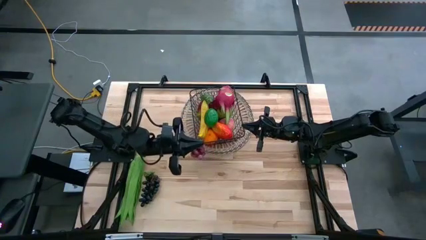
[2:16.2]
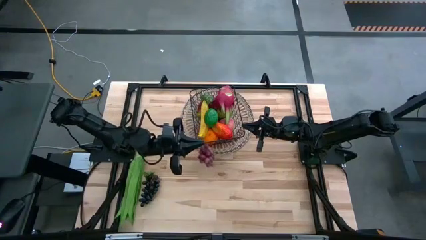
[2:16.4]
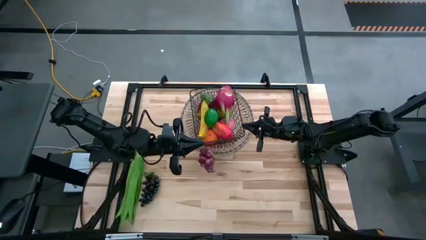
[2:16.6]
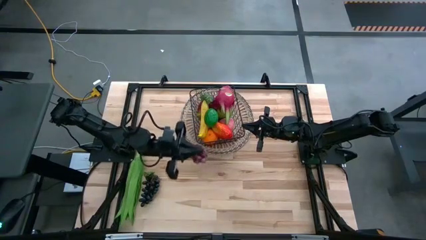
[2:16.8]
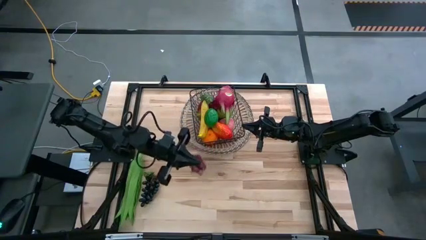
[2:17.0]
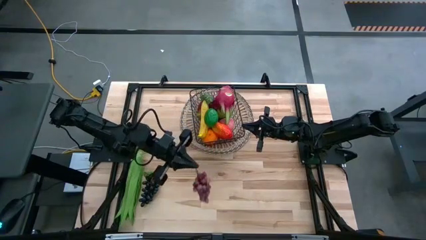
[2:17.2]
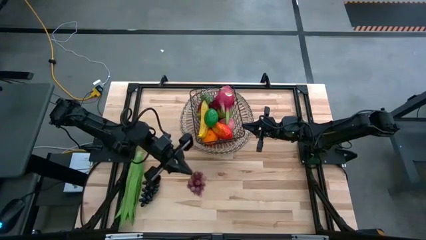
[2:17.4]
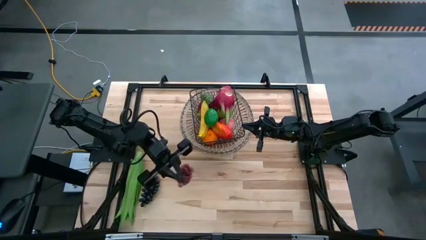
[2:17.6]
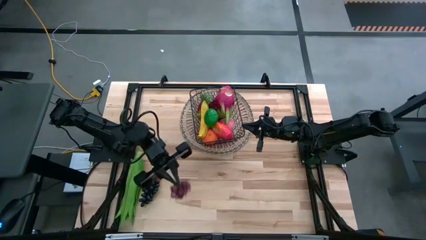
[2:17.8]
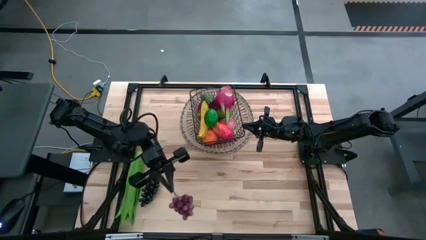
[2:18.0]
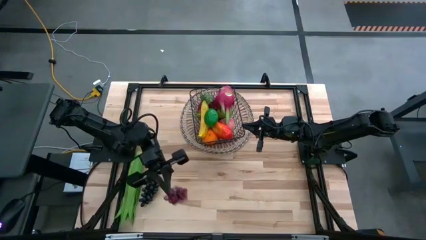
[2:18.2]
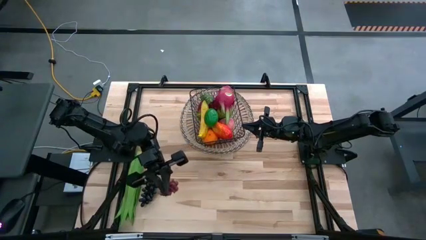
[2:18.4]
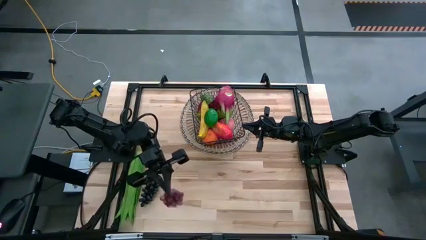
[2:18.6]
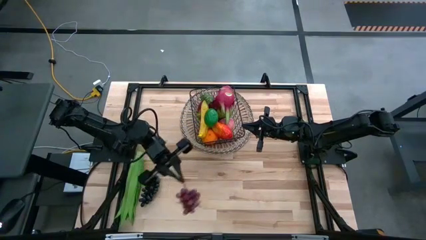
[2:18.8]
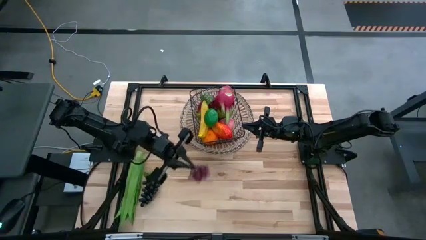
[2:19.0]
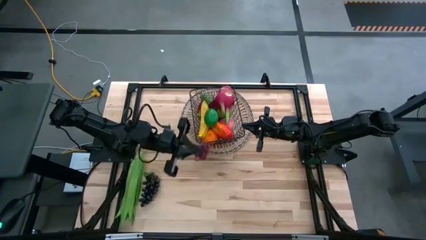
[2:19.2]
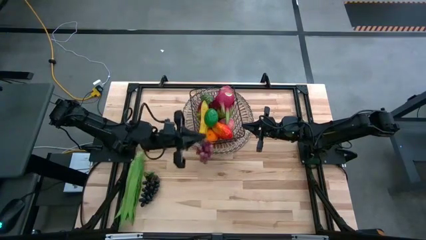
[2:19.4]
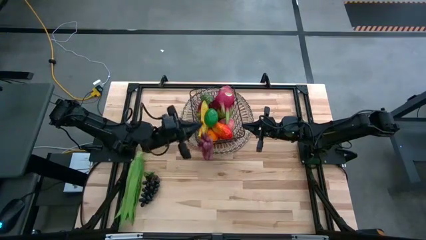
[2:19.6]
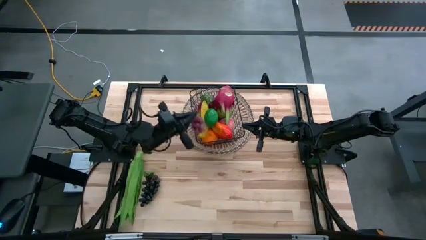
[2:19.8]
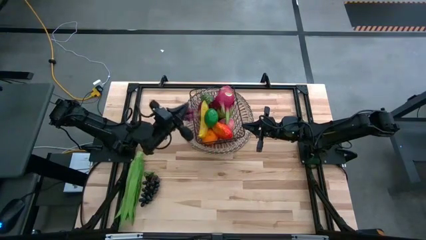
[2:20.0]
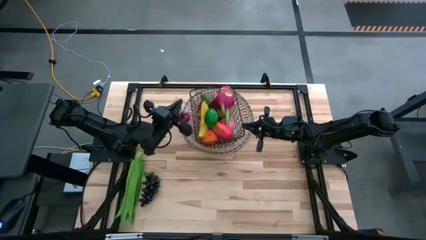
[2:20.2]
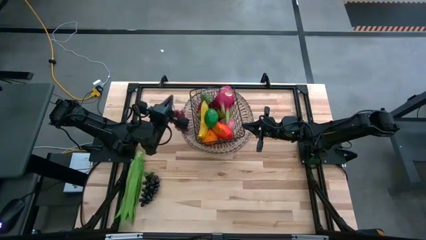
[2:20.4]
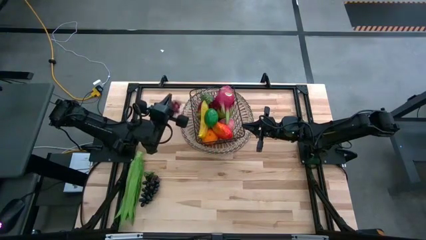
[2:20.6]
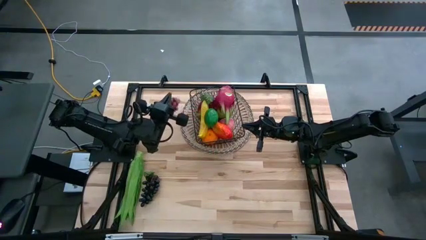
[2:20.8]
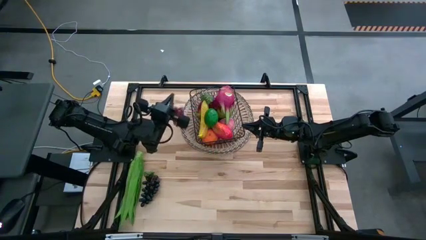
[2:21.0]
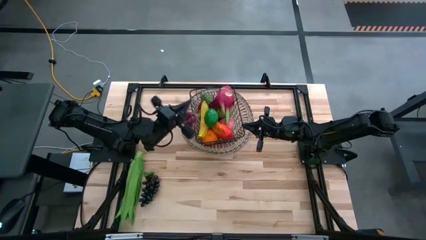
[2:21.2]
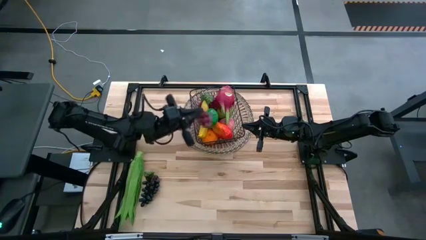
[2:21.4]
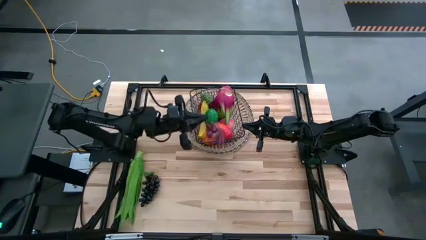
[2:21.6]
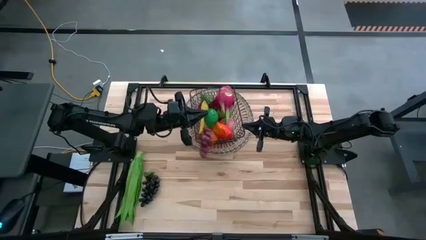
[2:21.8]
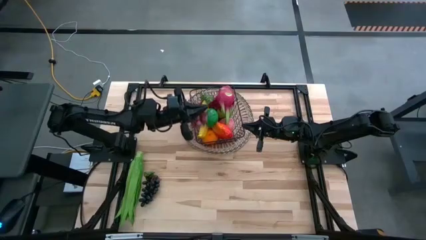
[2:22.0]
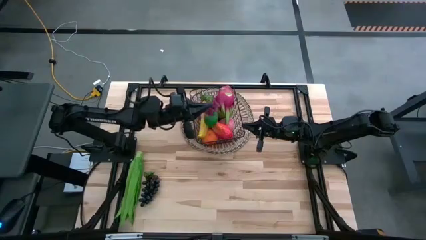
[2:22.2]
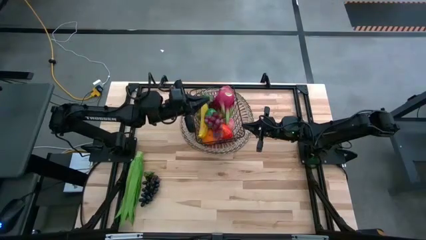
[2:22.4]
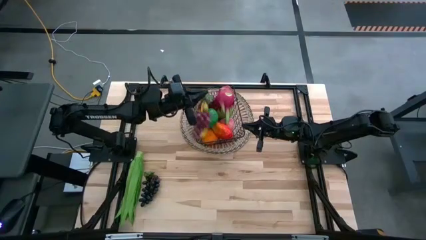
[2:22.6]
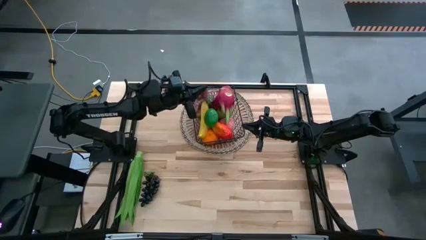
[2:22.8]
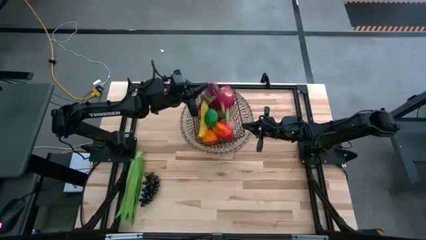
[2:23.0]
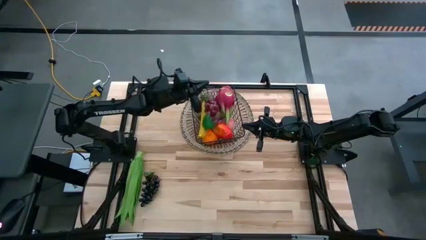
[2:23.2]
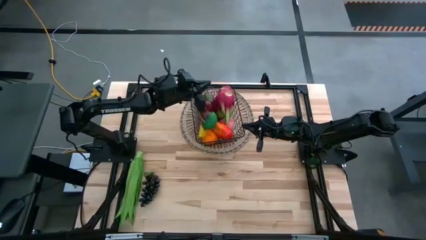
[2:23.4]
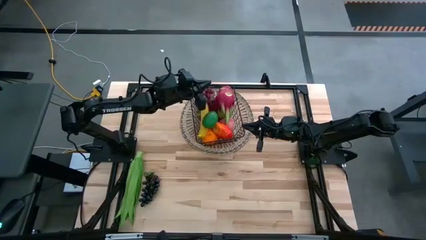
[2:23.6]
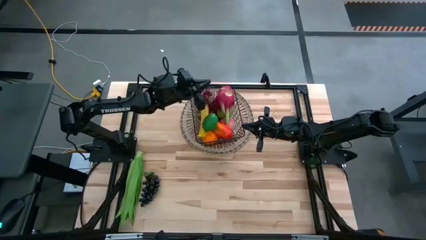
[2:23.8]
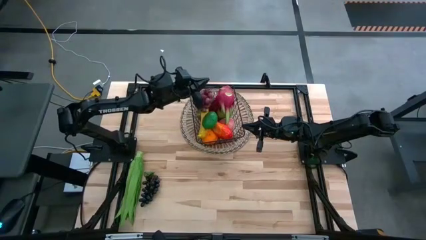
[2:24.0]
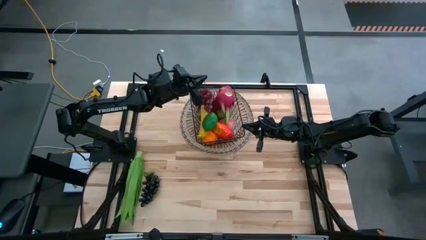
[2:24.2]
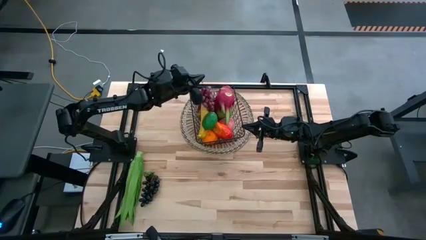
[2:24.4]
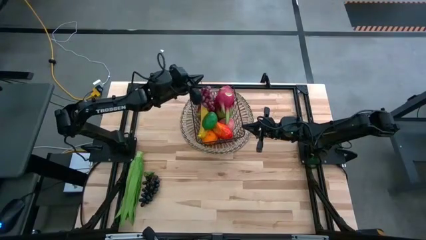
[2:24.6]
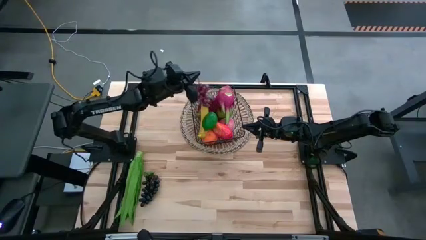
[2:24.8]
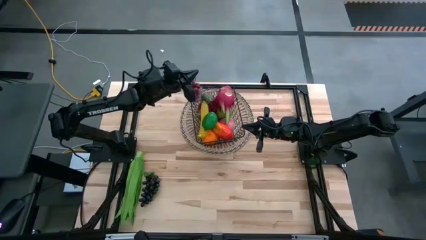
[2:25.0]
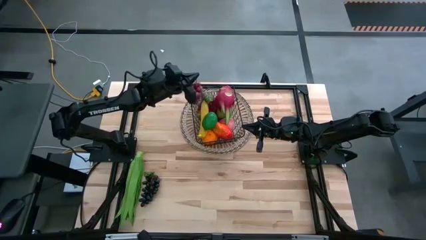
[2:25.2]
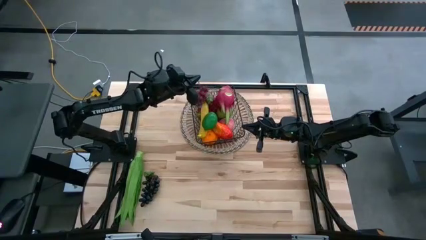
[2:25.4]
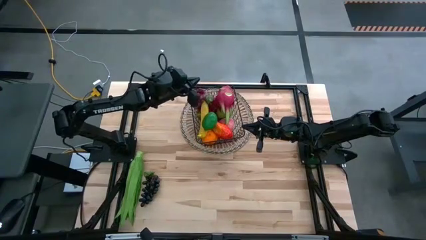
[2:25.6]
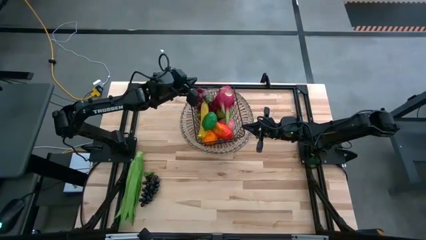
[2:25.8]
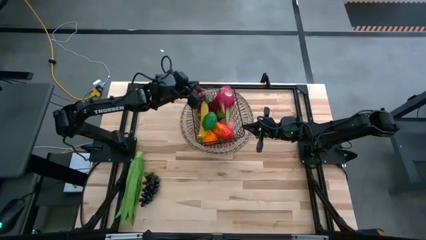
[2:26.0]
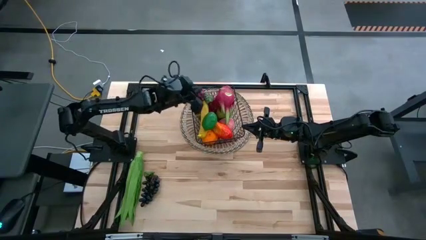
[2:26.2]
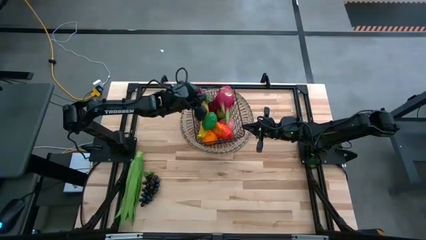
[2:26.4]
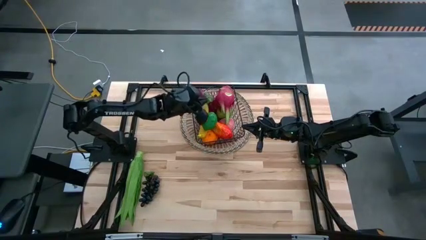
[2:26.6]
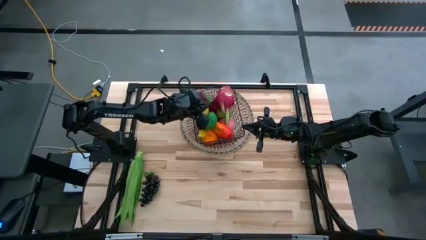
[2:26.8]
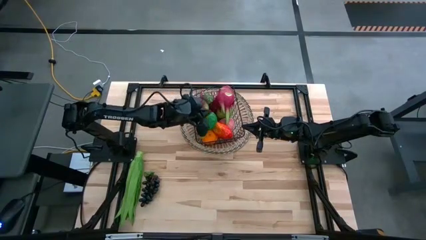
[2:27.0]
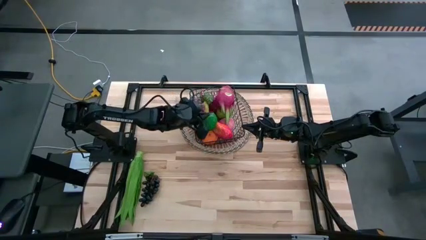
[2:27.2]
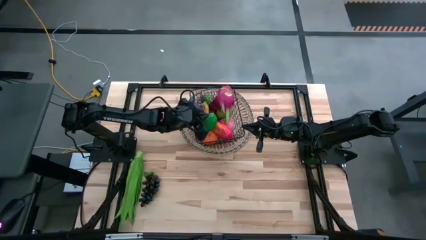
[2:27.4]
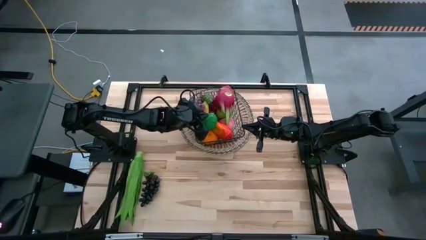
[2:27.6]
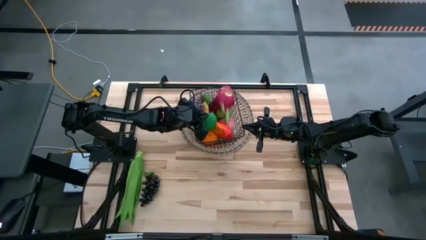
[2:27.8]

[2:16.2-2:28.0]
Task: Build produce basket
Put the top purple grapes into the black wire basket

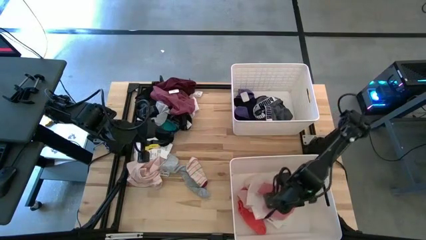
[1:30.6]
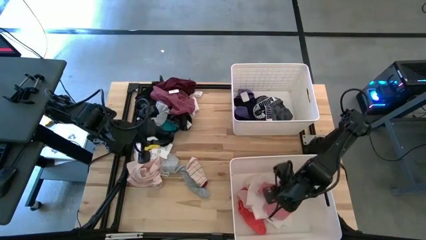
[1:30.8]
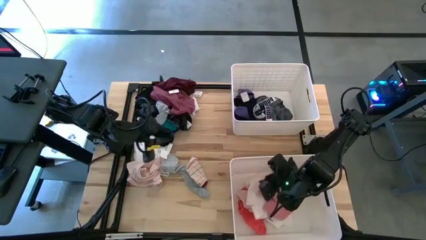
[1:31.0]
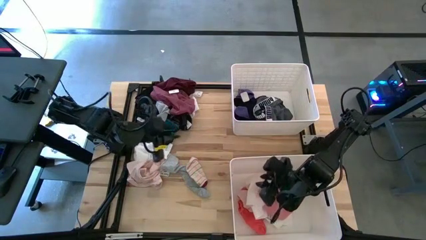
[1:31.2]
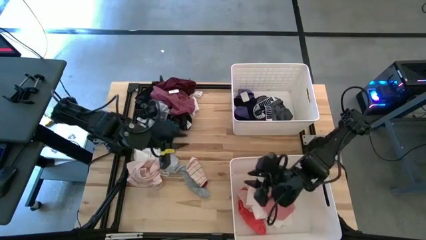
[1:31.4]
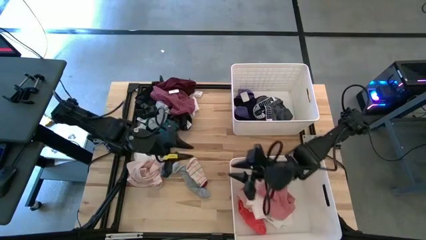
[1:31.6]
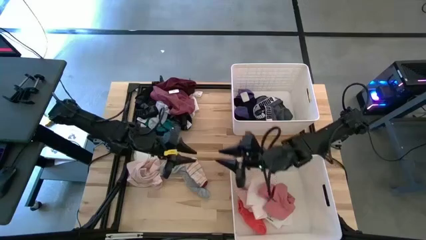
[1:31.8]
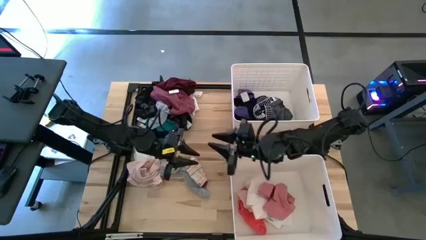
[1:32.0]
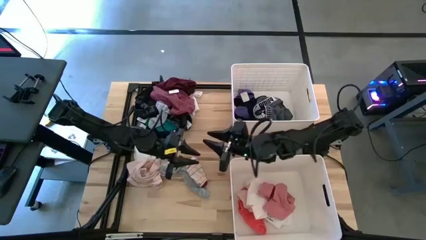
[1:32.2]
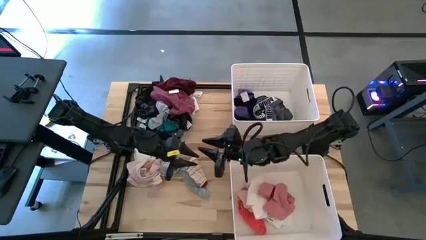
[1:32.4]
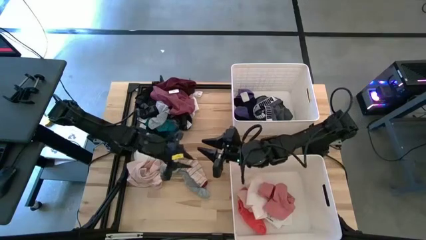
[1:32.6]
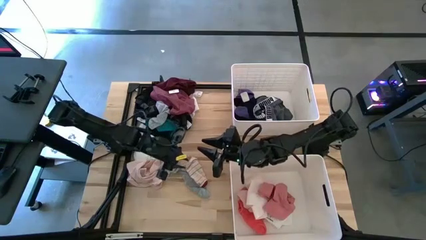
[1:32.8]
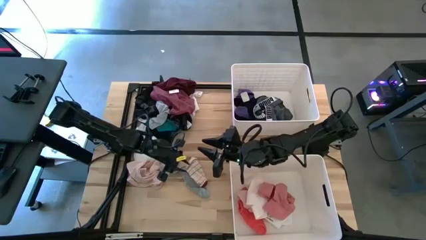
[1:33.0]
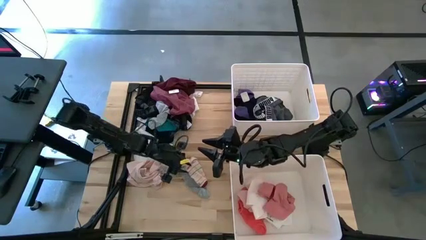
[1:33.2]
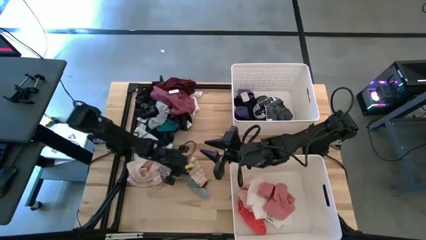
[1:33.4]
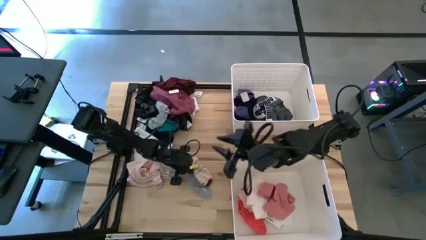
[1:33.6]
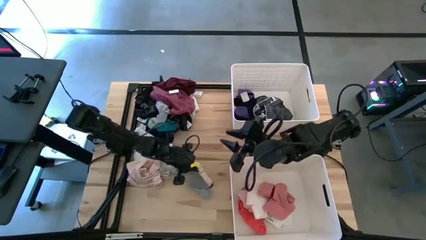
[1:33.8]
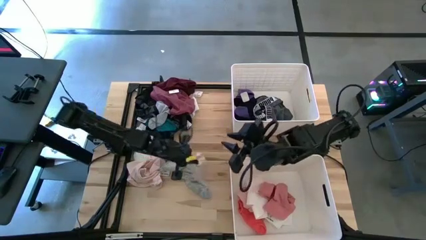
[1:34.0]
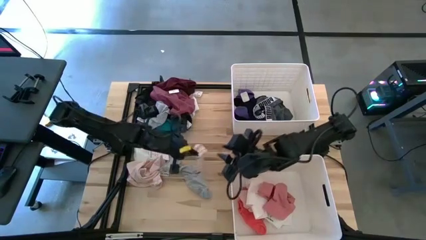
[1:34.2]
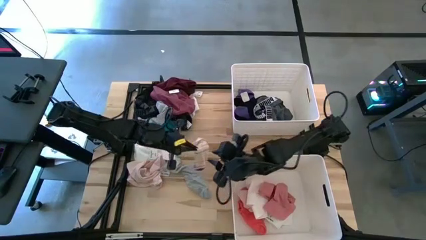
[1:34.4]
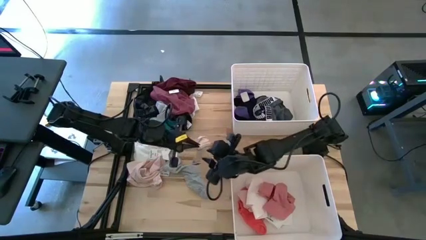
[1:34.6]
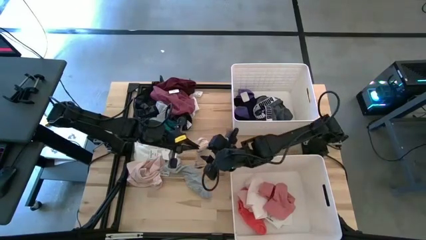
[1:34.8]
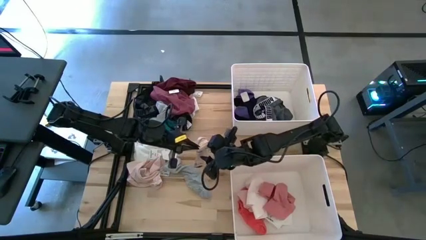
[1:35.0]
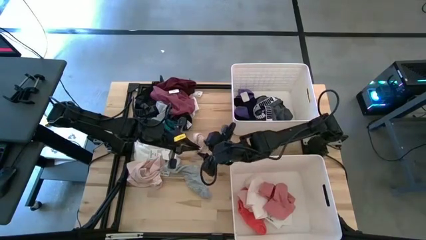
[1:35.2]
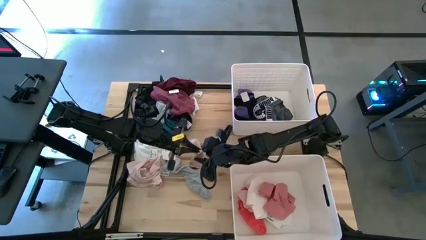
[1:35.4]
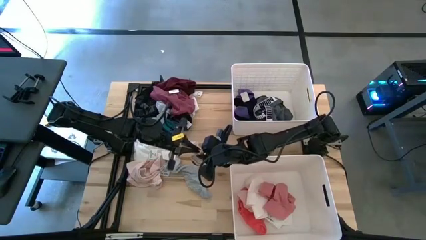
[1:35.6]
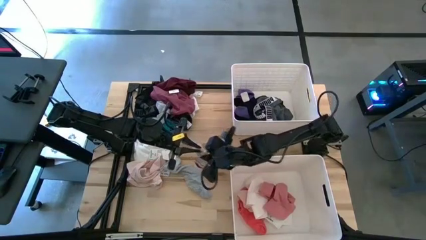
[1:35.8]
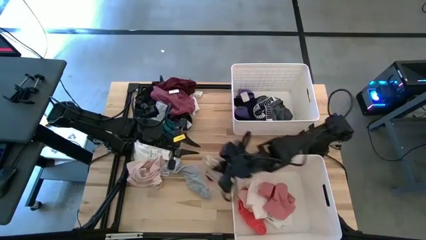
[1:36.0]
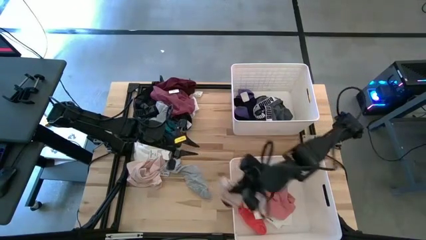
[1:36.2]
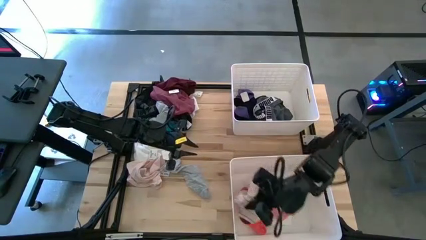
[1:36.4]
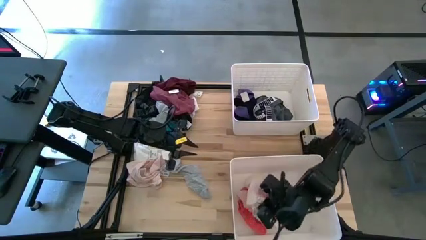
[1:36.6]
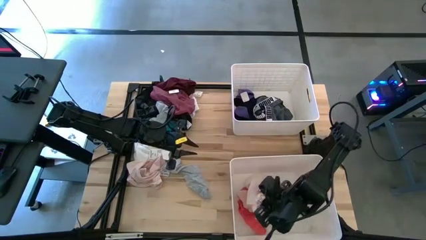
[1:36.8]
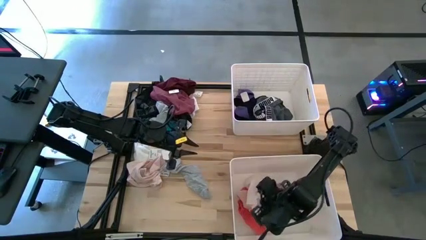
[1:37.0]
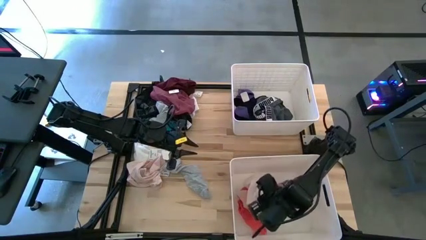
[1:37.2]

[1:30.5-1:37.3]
Task: Sort clothes
Put the white striped sock into the bottom bin
